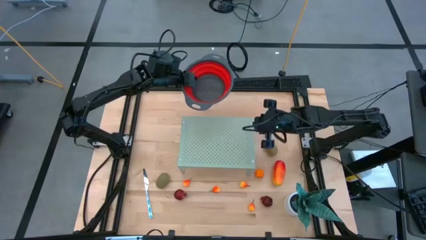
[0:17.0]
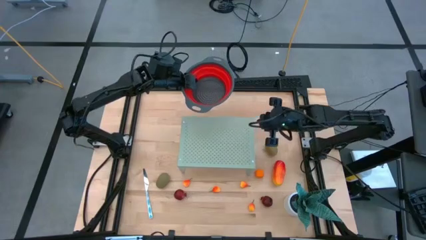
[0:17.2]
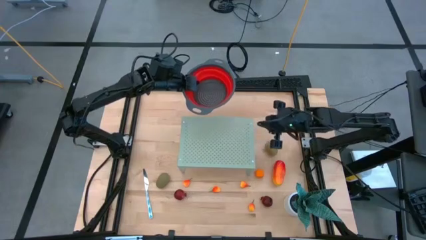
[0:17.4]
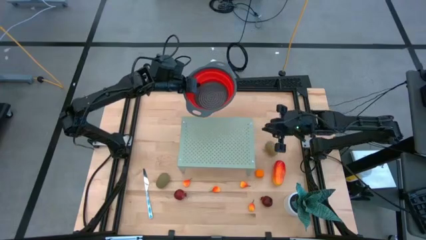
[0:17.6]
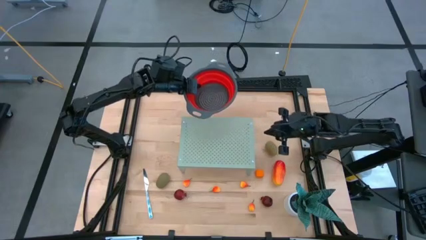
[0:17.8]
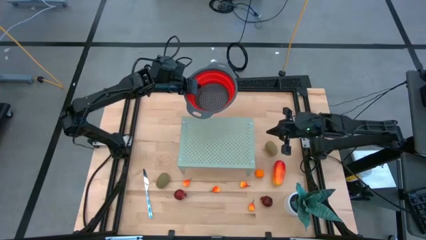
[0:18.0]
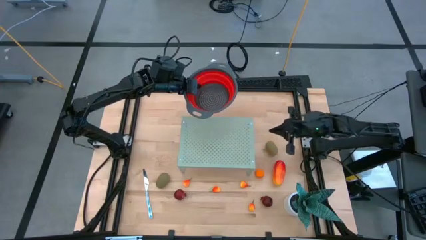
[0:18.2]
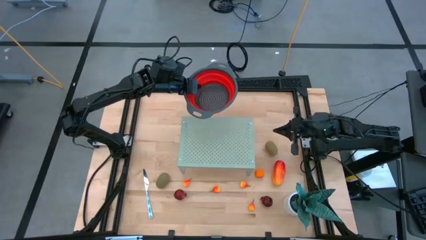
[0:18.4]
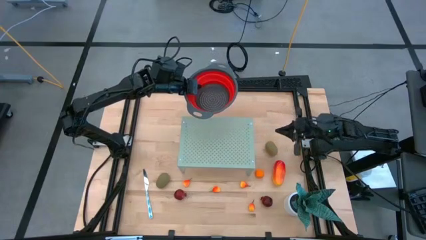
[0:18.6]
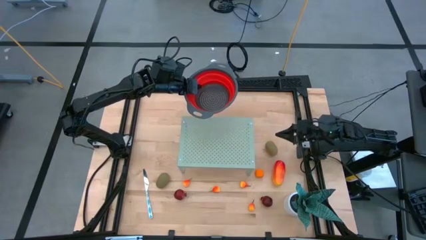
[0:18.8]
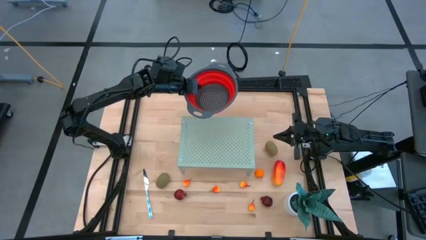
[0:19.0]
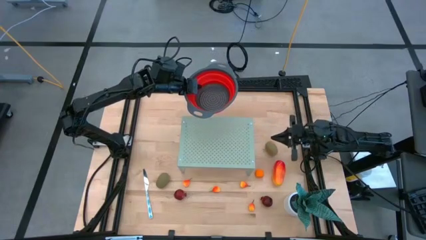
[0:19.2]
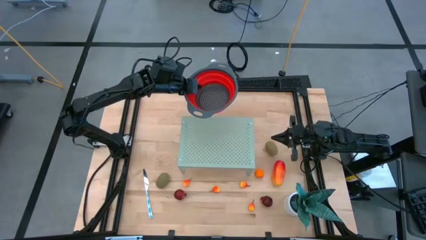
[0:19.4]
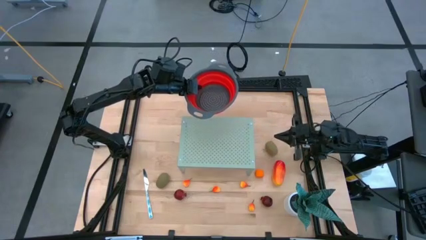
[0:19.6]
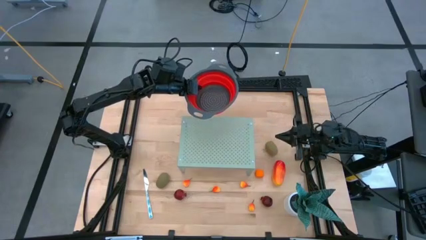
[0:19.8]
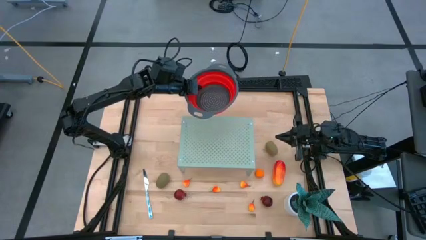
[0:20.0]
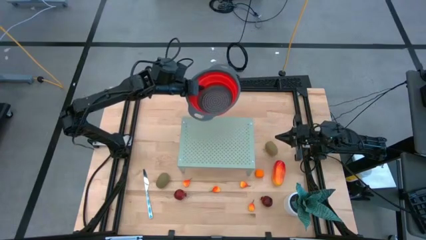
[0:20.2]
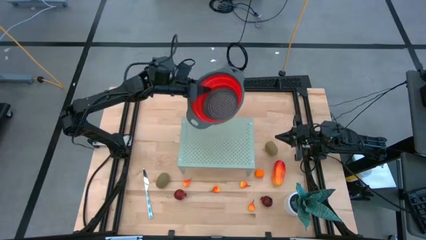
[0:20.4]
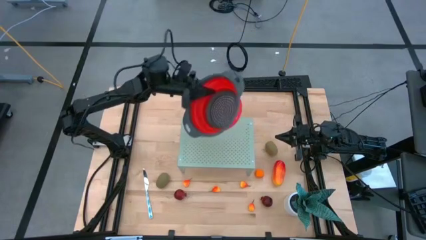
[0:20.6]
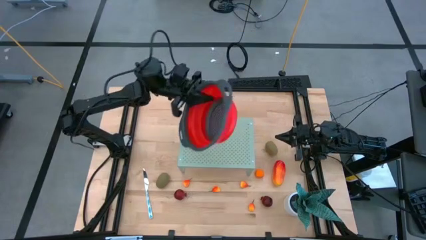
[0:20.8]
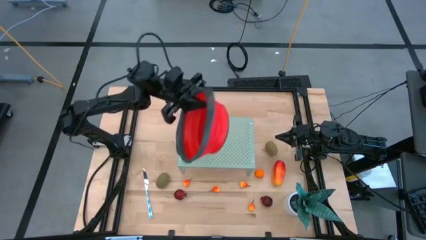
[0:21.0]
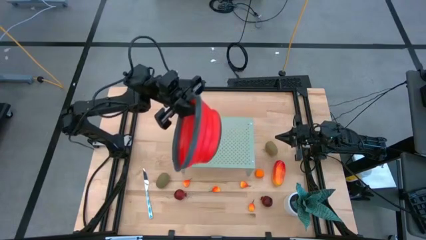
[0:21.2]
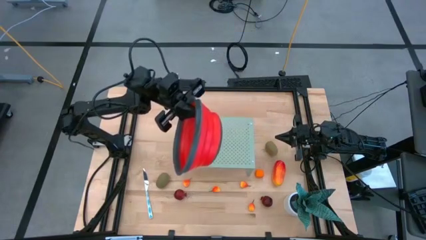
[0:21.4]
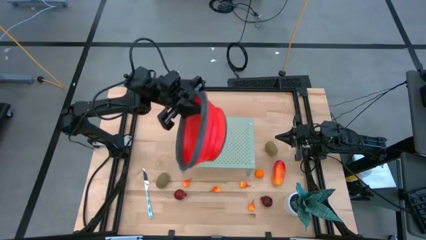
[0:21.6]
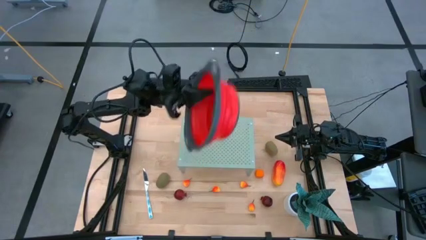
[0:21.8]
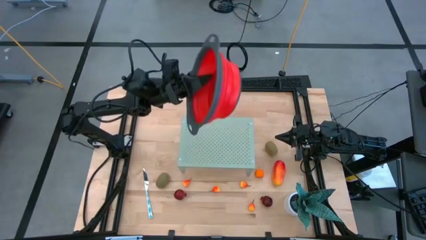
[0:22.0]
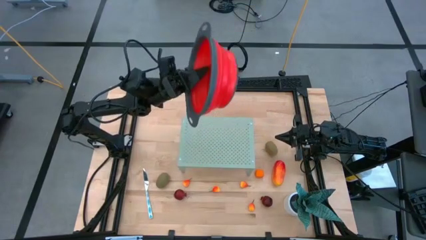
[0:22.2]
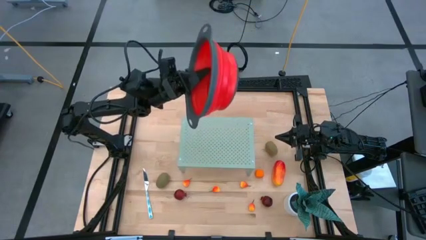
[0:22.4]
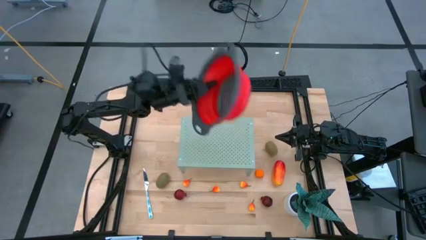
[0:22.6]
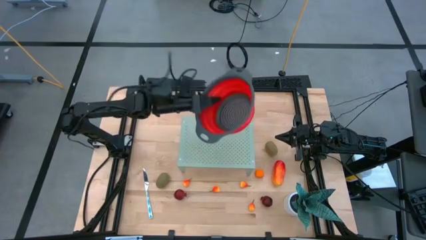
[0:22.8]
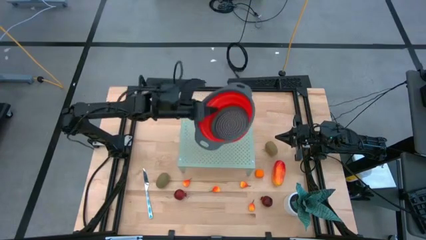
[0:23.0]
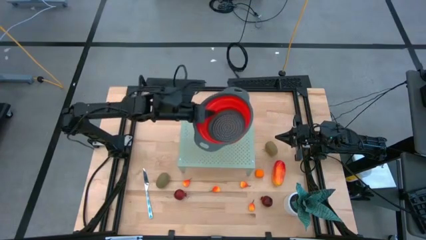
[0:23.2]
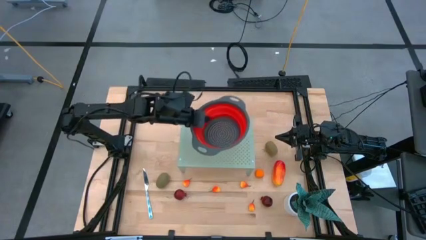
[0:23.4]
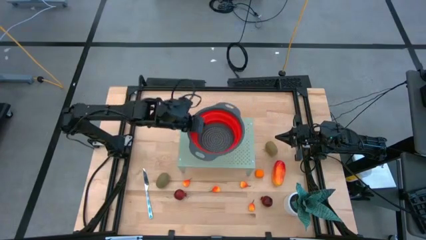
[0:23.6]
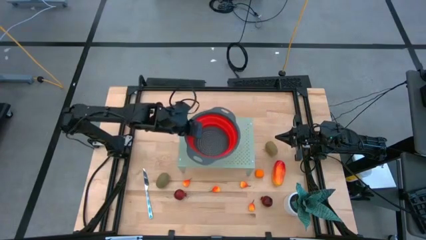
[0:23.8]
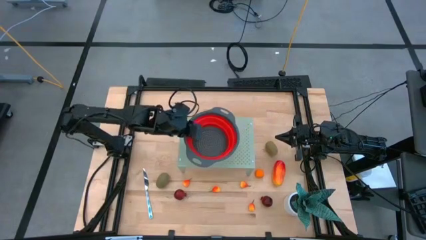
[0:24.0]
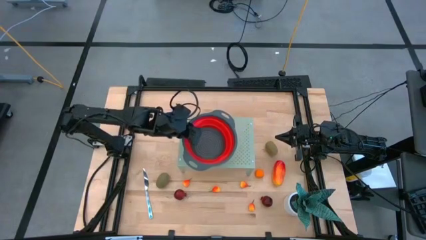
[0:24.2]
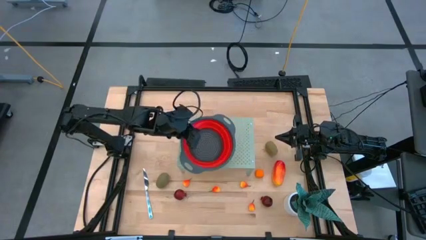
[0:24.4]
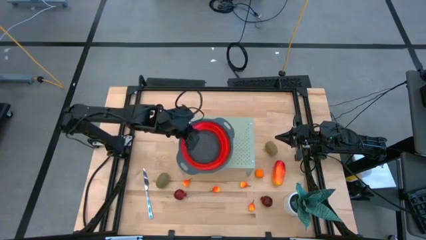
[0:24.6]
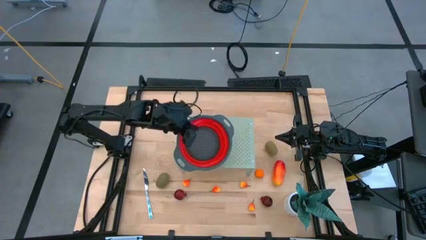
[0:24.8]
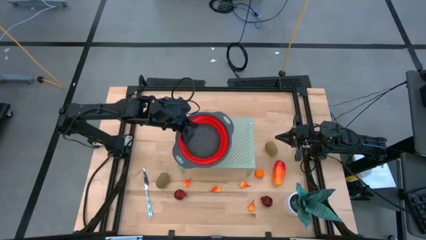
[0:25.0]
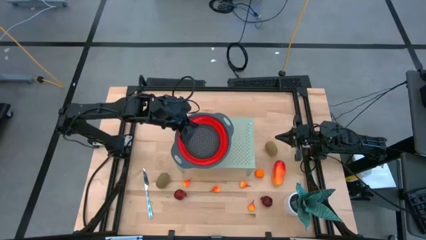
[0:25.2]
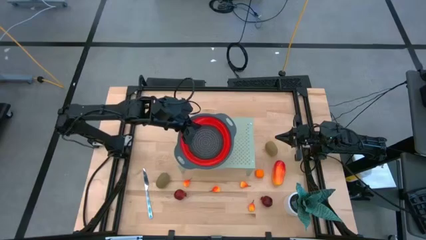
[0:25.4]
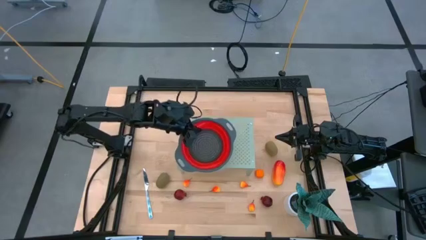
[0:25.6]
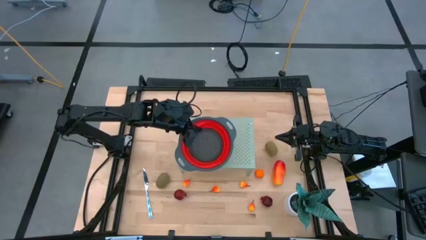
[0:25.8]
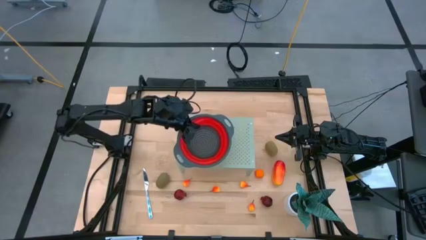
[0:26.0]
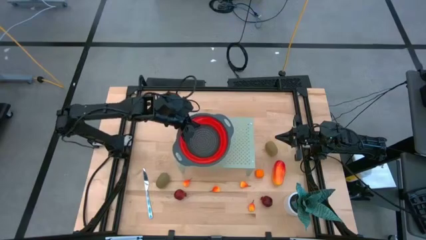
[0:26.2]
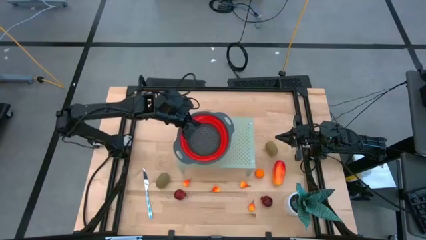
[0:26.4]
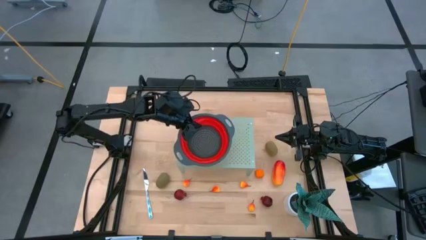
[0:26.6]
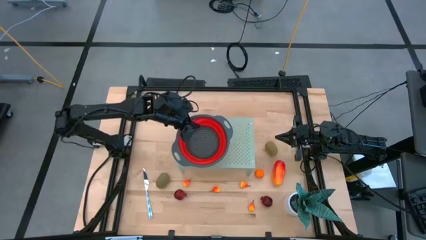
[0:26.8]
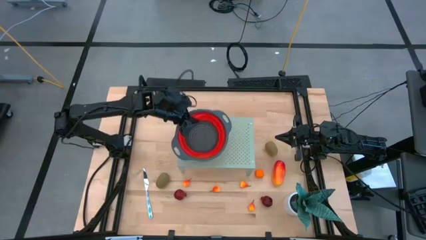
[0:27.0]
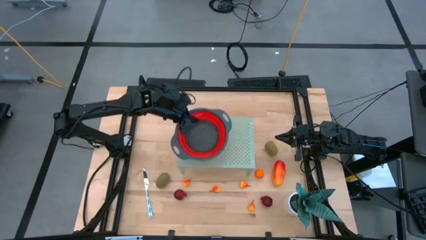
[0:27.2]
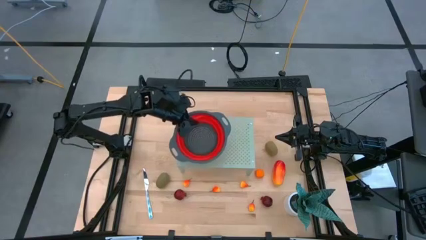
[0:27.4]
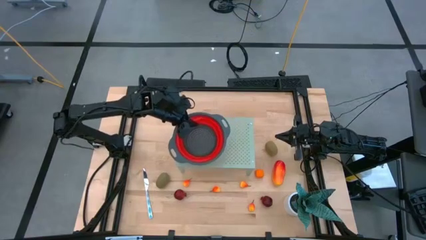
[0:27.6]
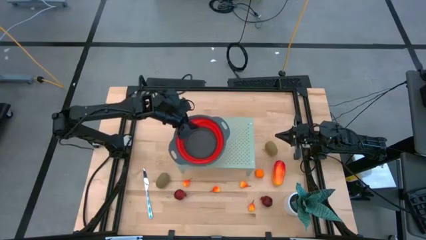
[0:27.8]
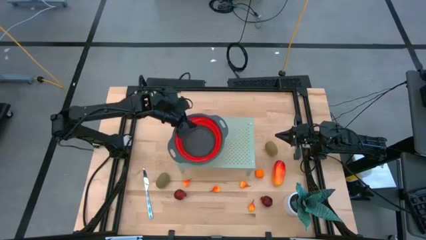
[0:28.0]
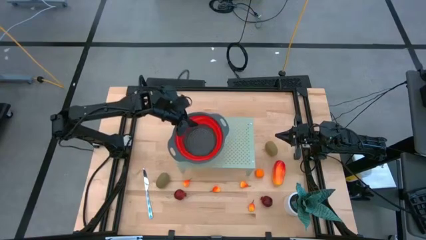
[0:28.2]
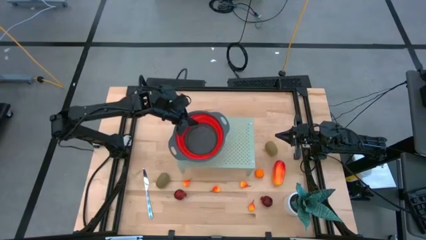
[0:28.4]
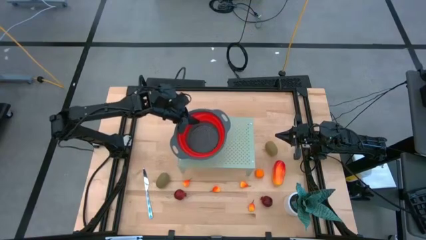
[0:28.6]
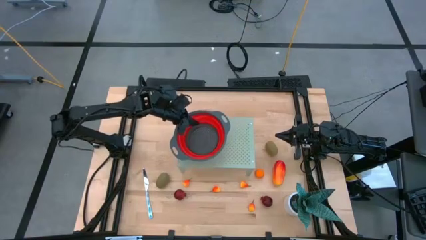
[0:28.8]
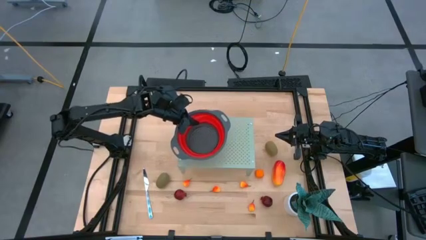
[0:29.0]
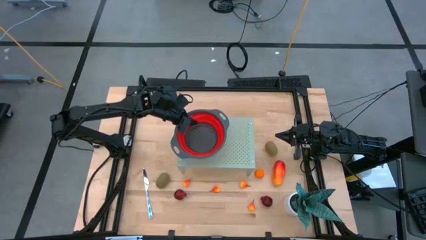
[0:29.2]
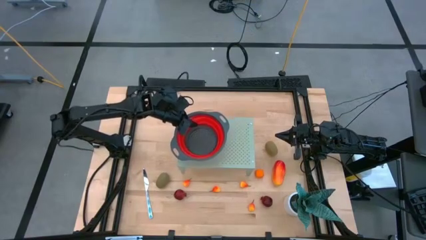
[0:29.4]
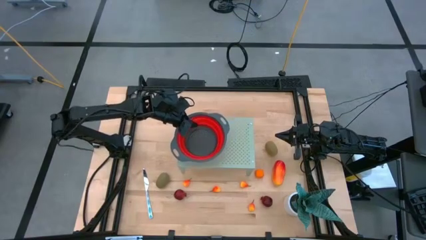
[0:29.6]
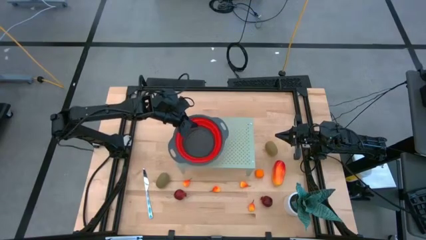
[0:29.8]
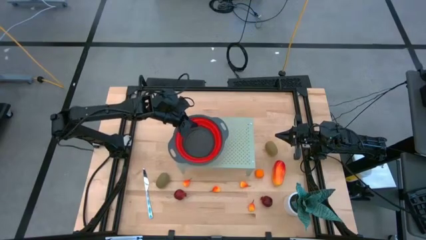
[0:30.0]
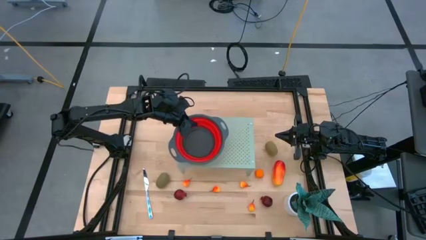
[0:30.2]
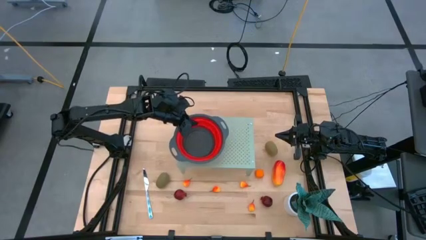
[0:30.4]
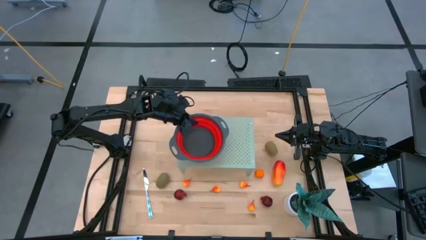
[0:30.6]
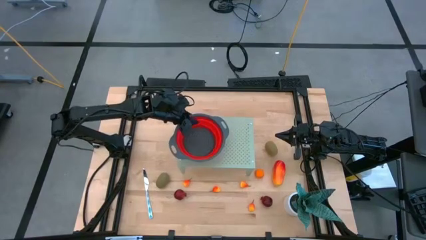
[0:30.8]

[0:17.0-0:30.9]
Task: Pick & Place Fruit
Put the strainer on the shelf
